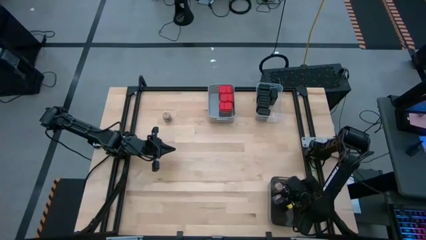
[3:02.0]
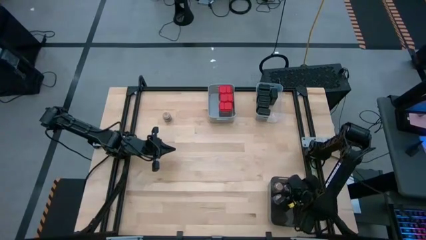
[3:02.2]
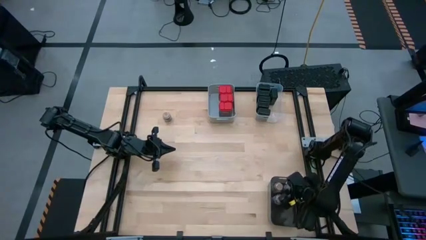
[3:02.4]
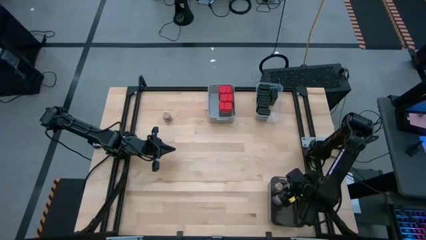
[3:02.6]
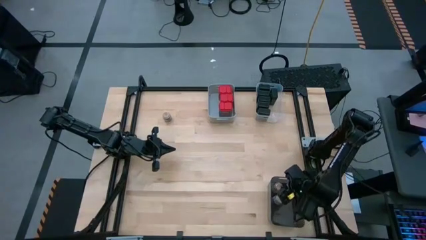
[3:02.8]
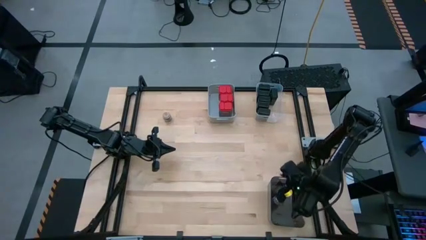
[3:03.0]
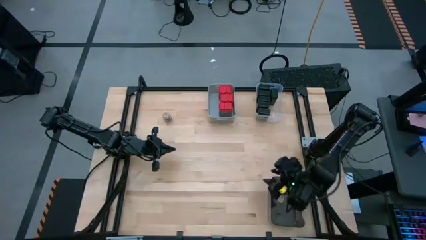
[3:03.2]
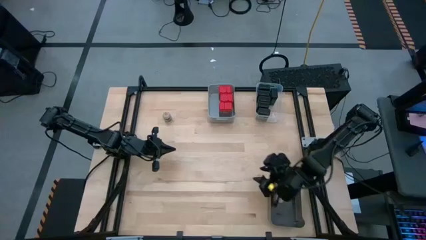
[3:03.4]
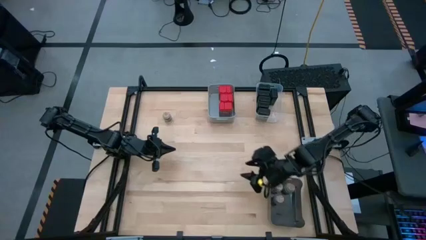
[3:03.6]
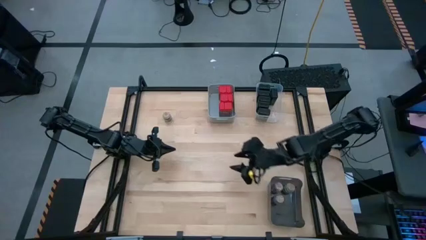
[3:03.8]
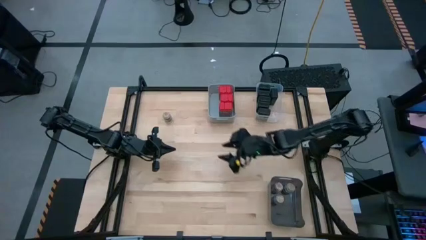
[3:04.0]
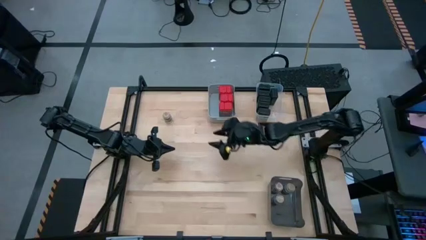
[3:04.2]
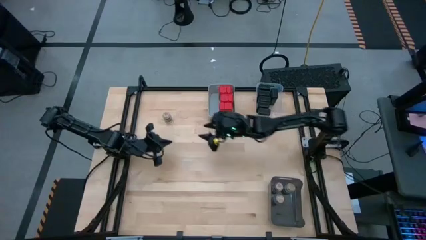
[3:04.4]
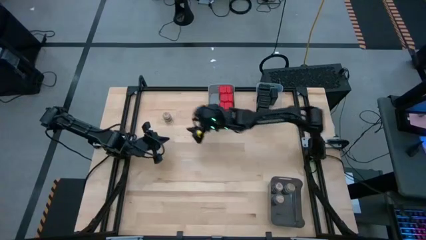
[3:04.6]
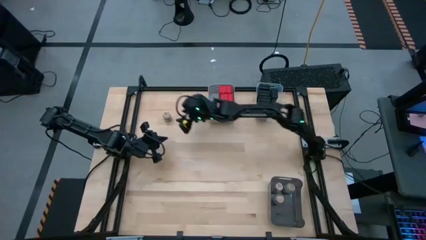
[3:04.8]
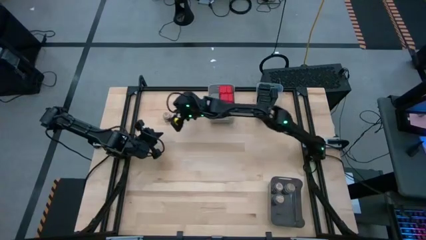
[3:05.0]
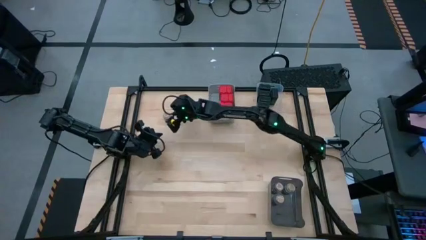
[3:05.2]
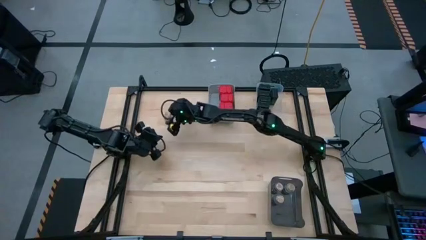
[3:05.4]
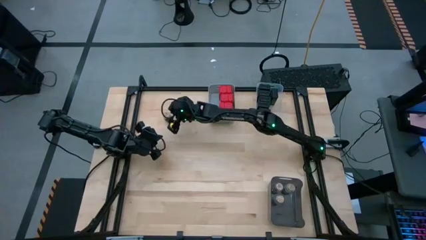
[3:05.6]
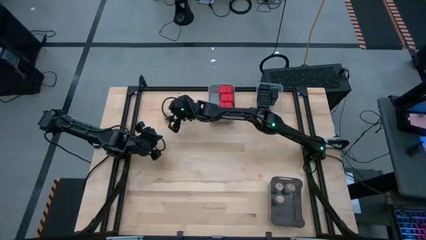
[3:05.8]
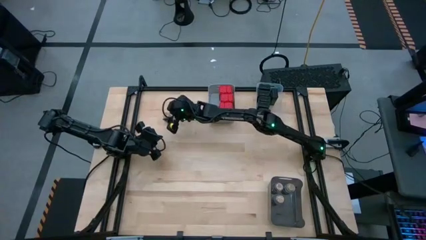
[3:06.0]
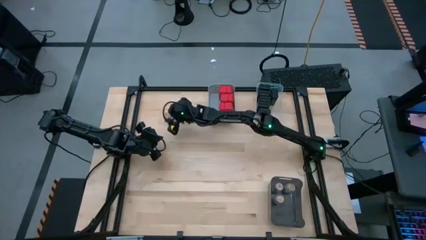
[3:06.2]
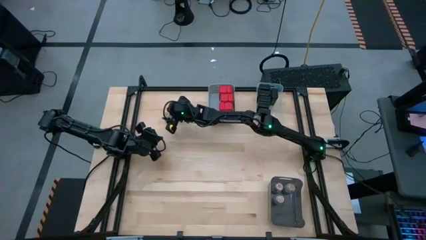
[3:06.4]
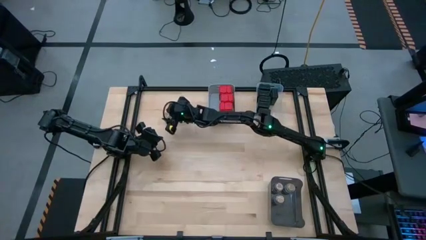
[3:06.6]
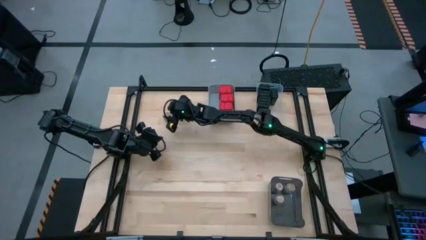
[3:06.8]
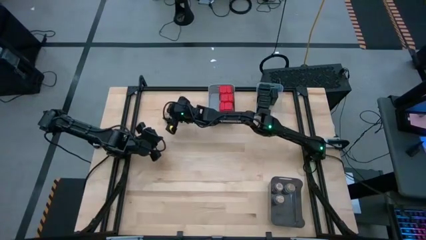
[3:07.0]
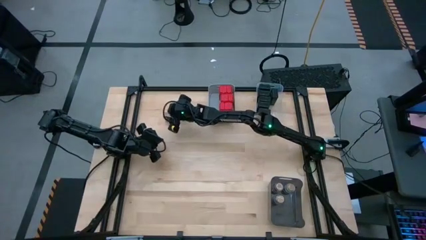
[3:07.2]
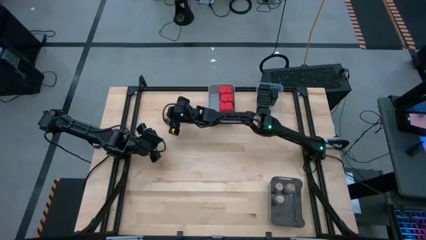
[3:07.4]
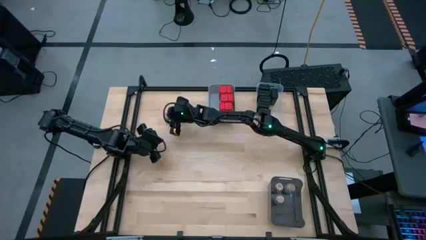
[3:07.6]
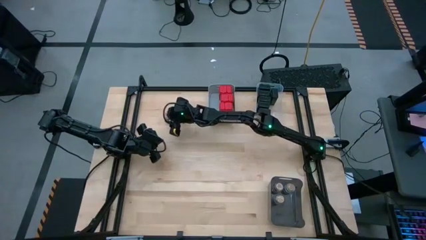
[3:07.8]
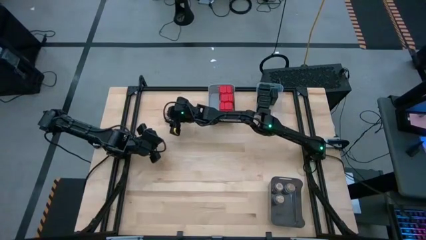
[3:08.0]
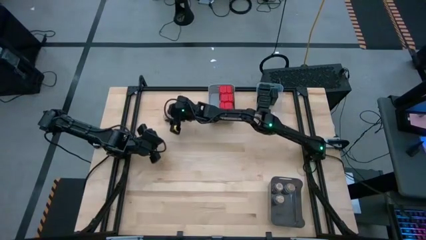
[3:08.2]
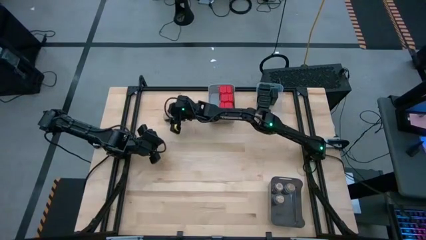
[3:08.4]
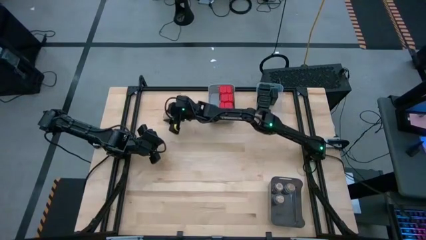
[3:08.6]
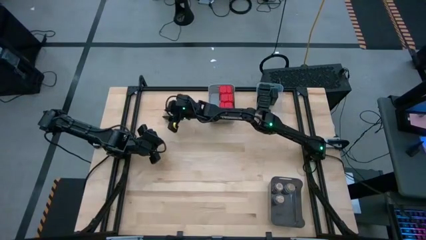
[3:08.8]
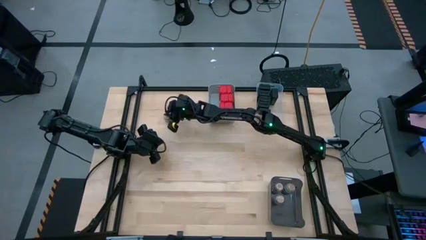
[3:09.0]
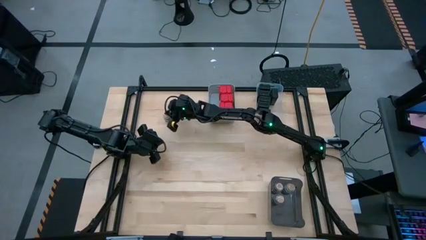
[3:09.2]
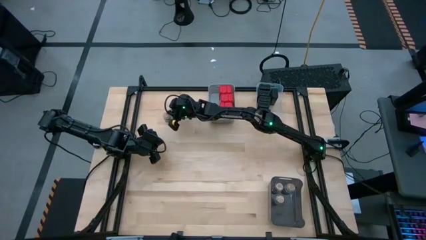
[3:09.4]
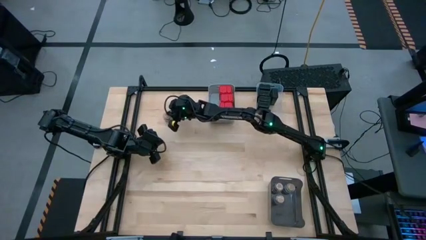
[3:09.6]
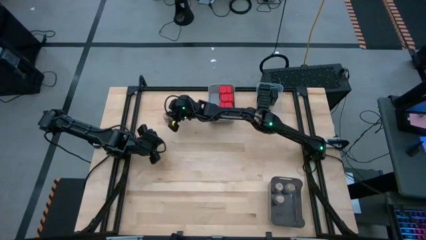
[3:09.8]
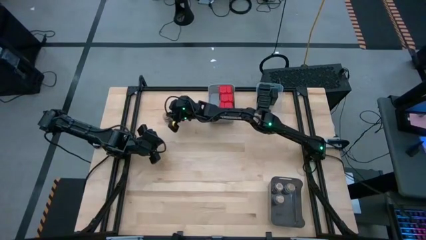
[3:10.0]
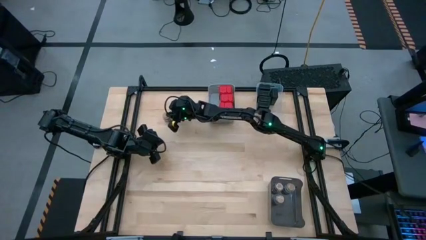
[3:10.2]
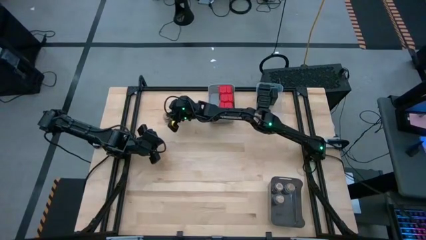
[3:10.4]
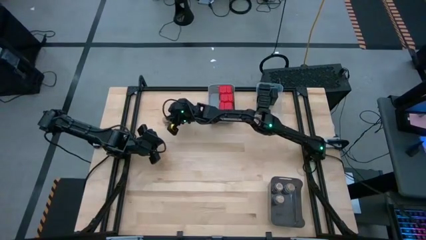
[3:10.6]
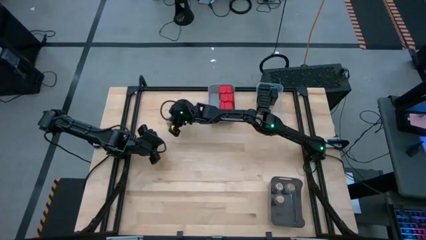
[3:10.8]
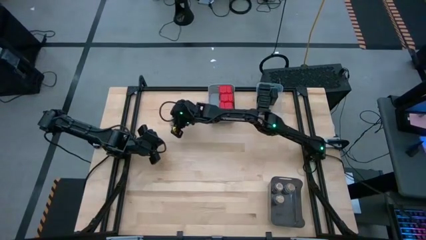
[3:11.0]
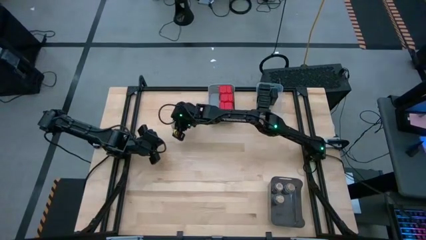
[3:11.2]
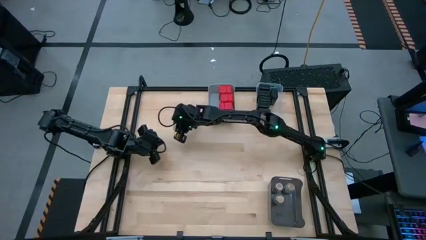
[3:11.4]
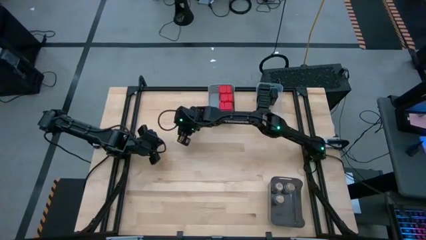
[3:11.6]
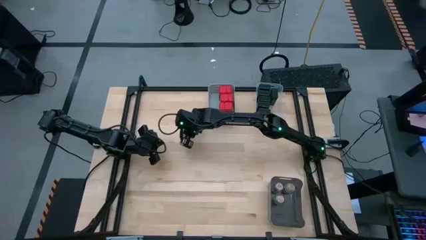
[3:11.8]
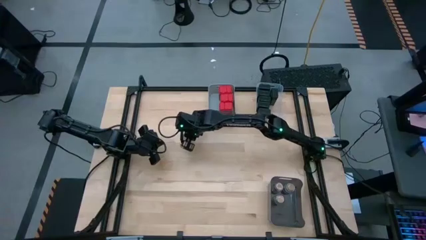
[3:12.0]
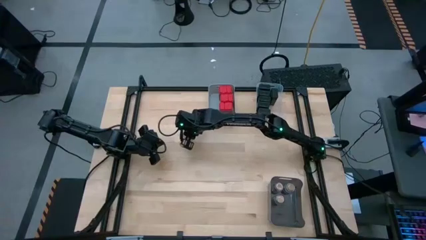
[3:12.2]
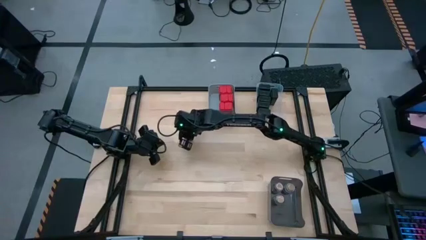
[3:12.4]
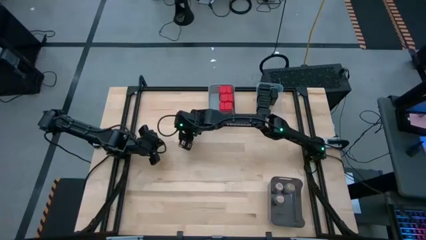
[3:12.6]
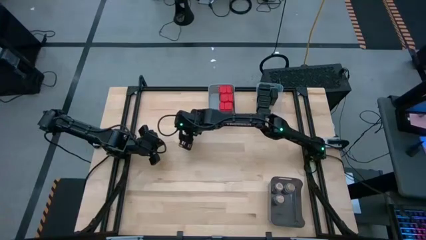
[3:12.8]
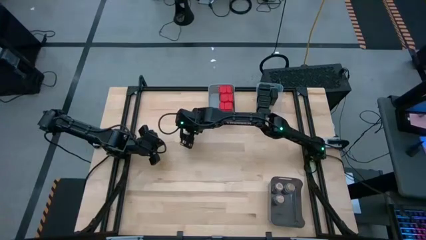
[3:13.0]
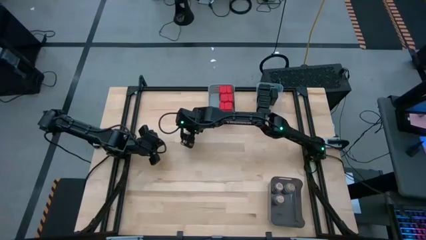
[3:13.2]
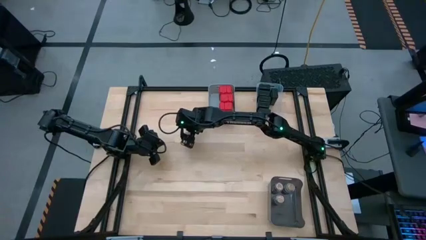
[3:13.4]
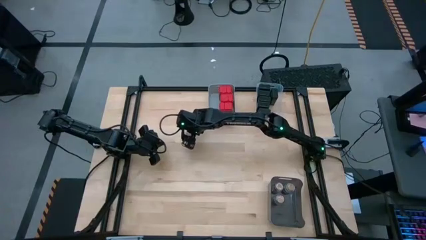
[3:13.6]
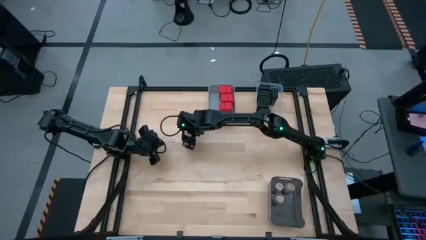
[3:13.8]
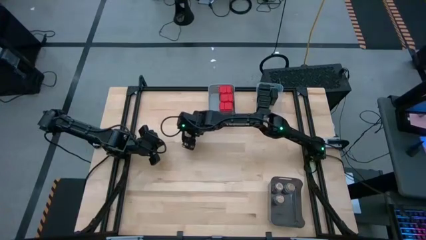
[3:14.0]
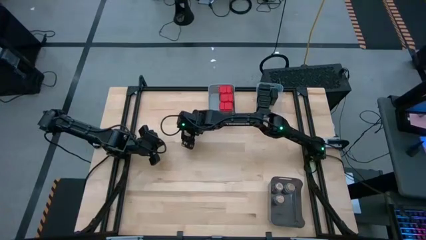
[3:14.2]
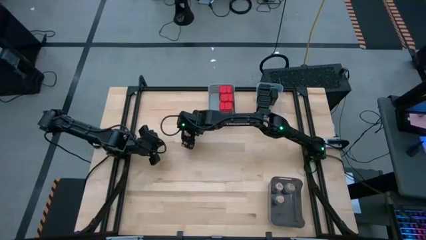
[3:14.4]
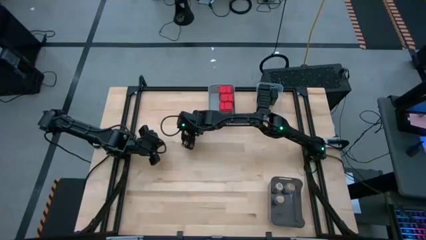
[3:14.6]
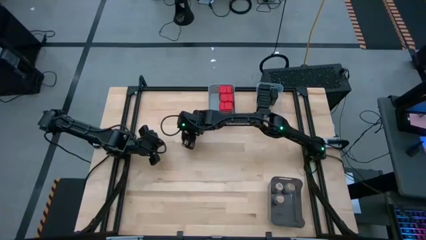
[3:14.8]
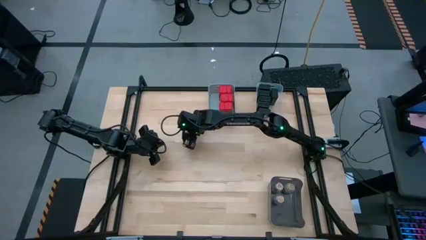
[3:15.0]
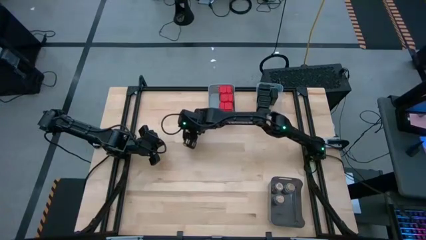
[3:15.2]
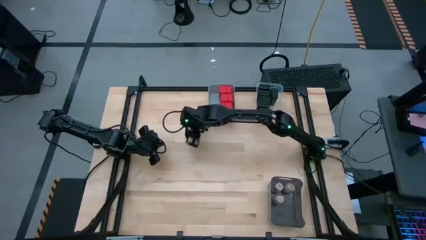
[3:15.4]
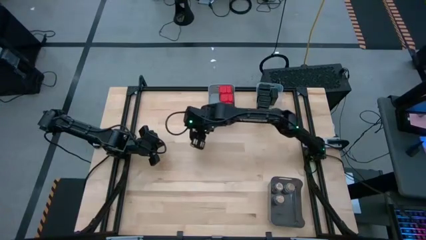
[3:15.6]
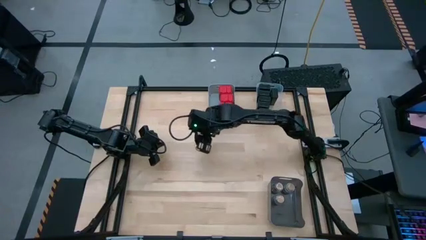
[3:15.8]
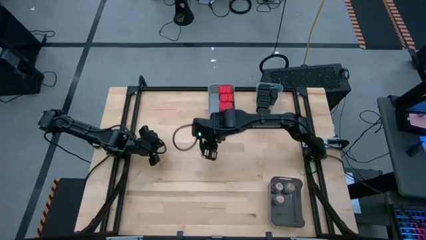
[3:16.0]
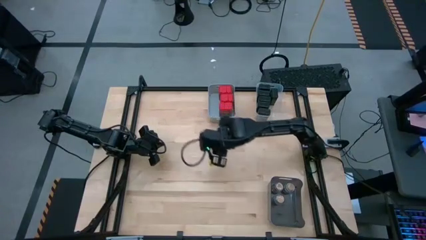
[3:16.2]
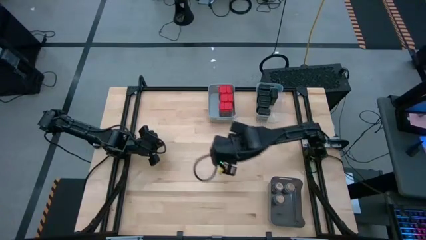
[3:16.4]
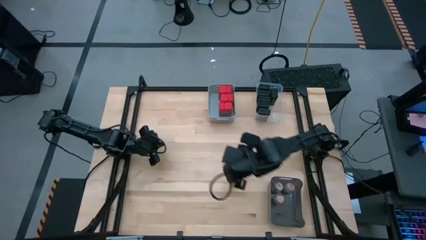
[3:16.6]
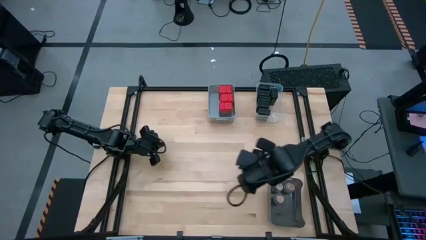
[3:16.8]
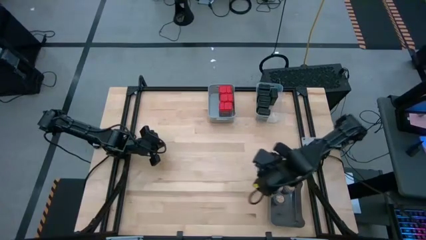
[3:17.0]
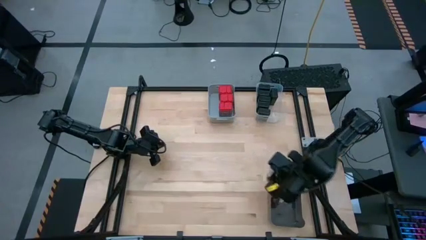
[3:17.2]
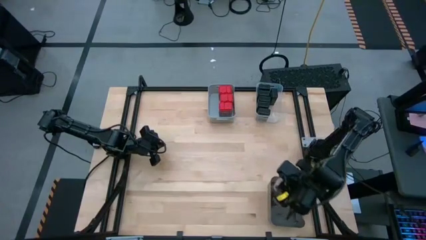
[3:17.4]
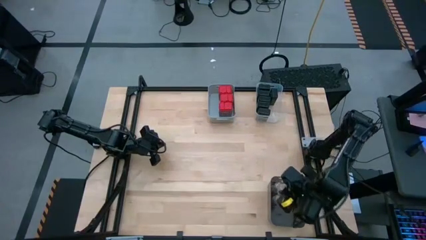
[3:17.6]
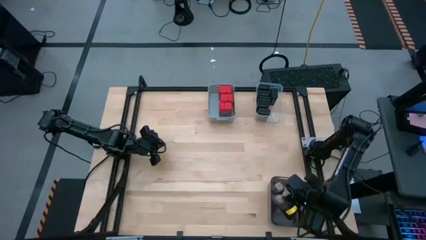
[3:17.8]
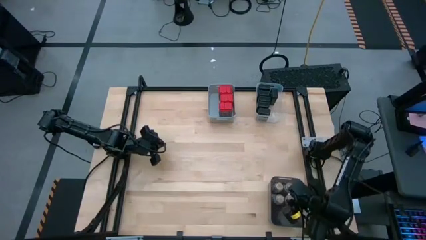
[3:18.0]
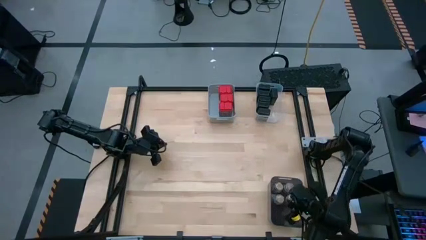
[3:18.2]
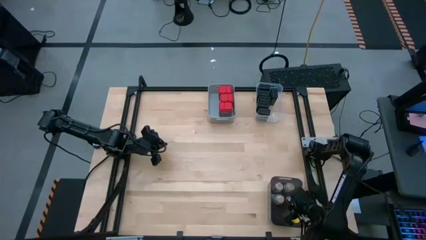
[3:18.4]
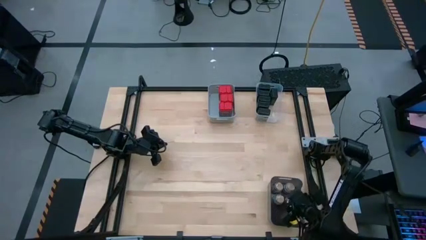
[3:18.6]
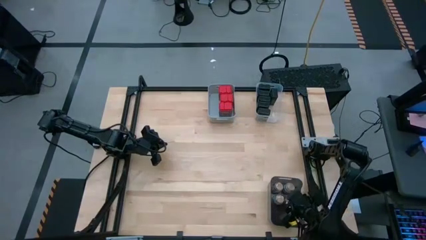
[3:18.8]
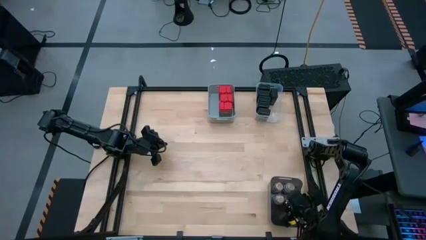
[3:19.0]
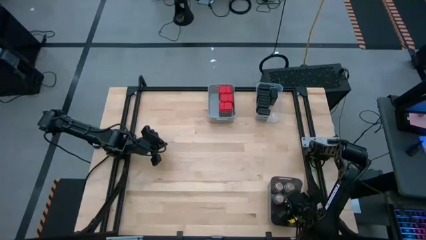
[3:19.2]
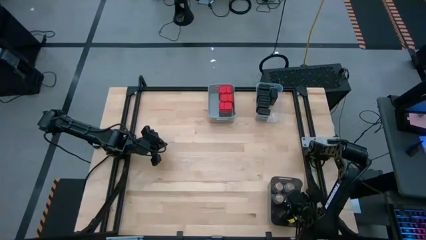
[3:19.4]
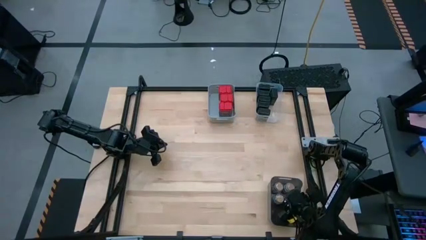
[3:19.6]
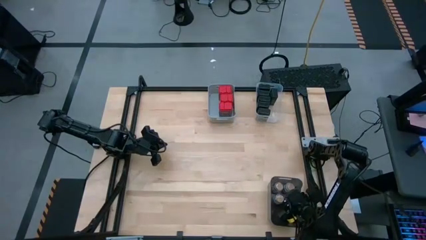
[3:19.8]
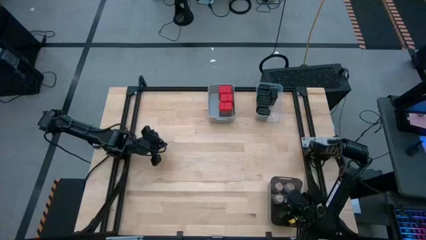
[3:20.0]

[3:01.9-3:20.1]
Task: Sort spices by type
Put the brown seasoning bottle into the black bin
